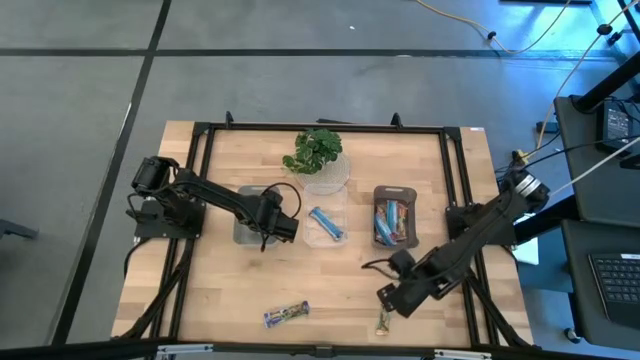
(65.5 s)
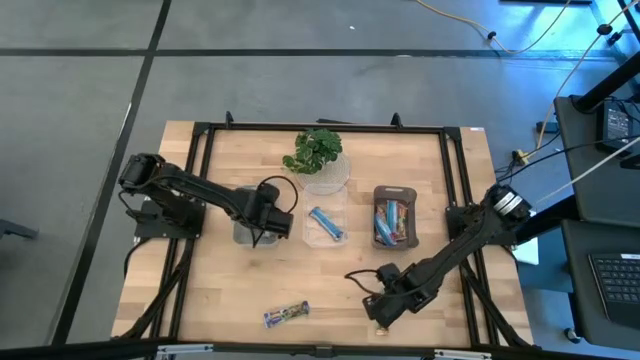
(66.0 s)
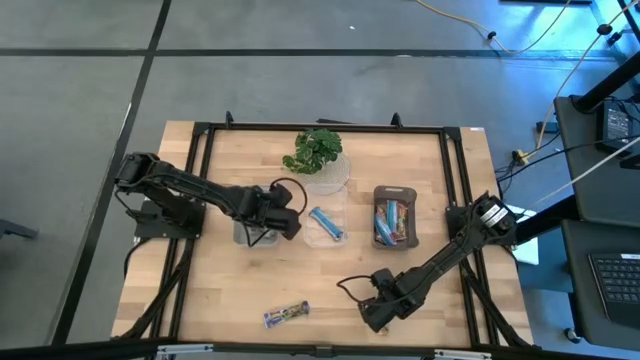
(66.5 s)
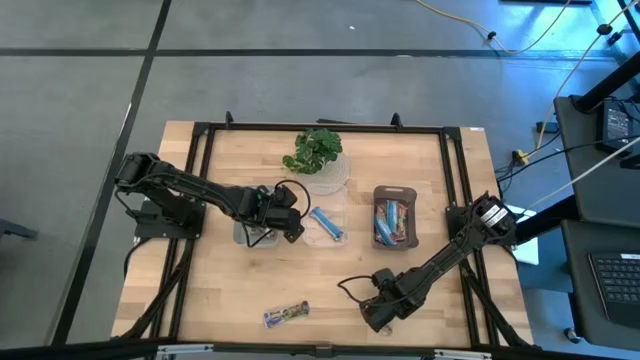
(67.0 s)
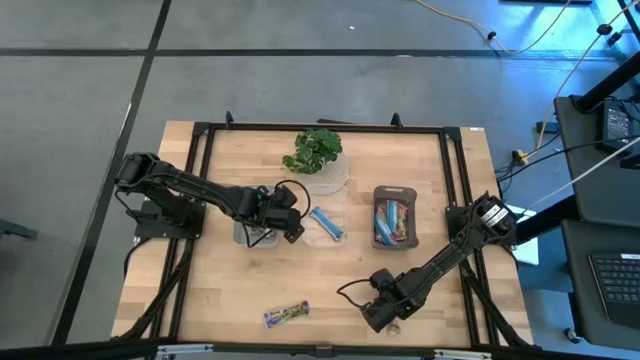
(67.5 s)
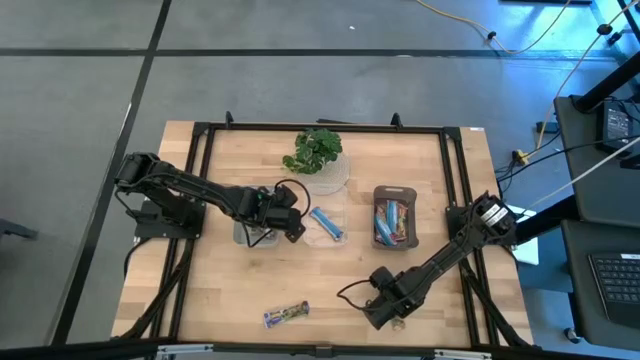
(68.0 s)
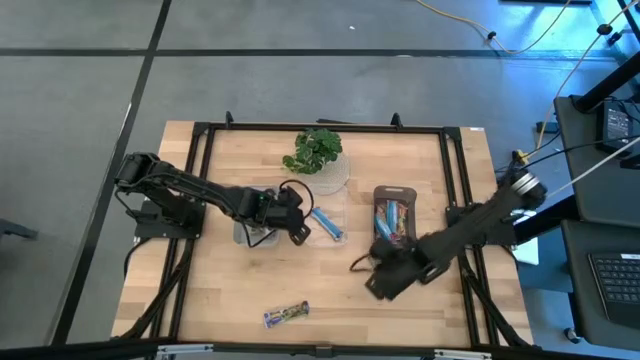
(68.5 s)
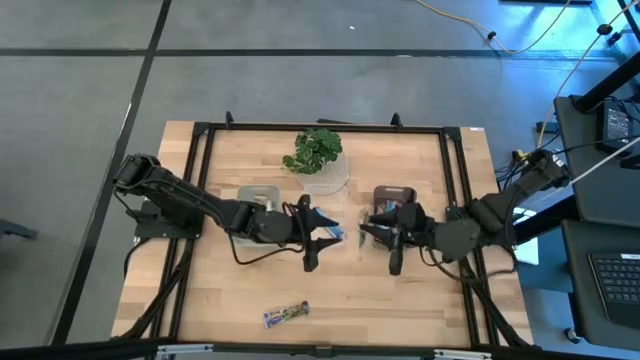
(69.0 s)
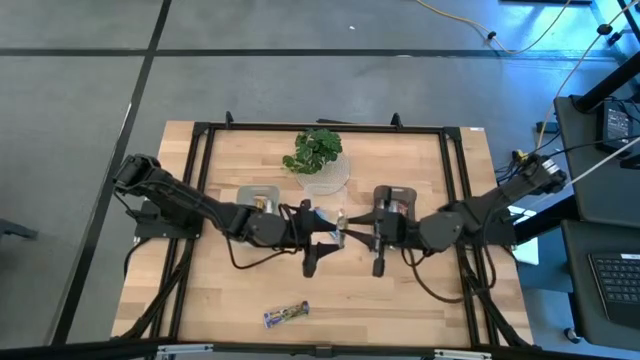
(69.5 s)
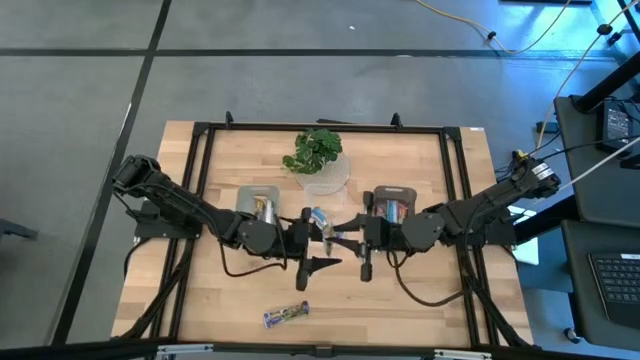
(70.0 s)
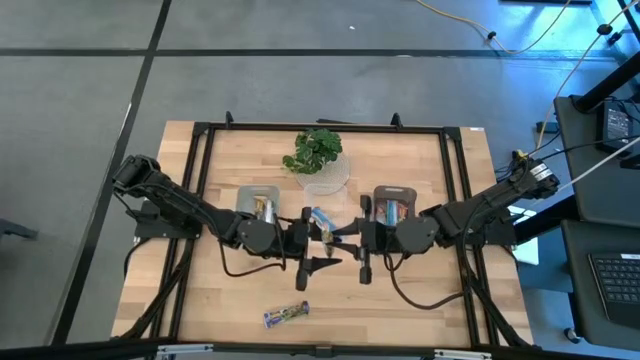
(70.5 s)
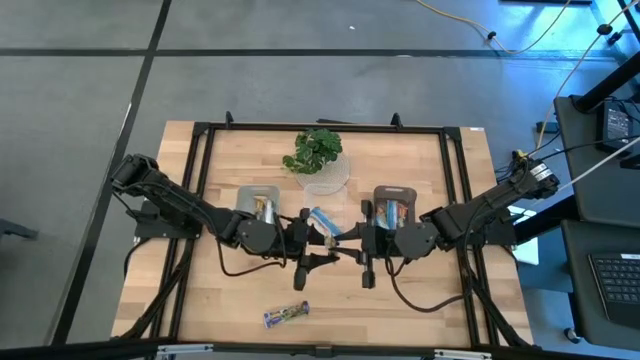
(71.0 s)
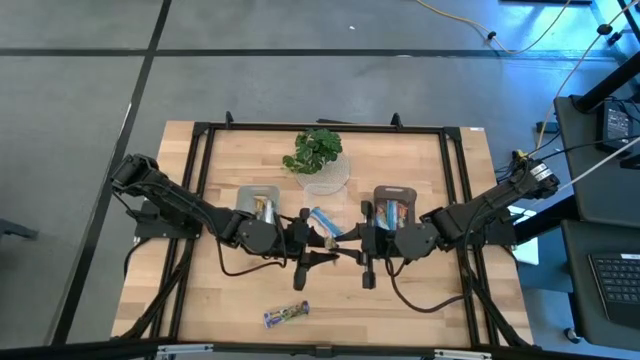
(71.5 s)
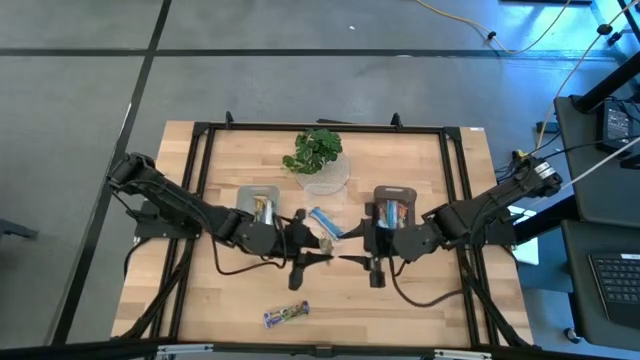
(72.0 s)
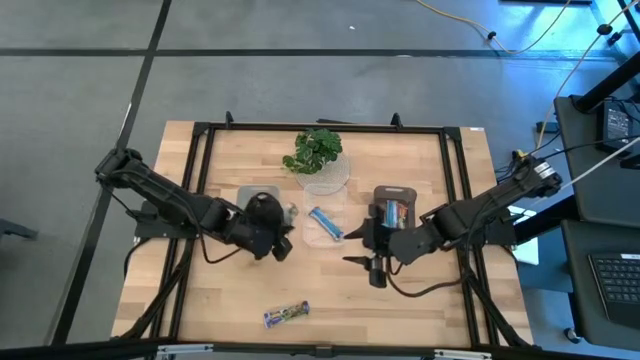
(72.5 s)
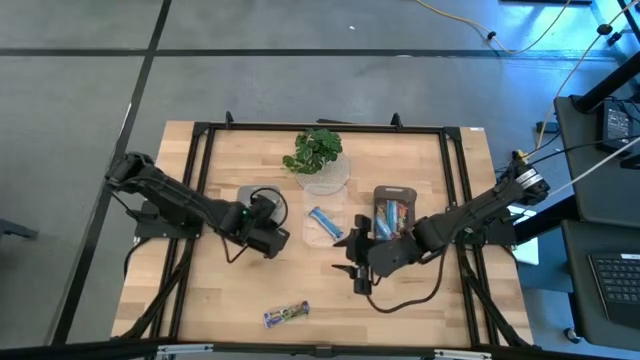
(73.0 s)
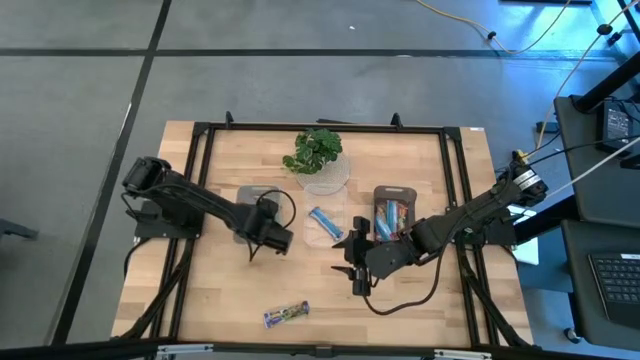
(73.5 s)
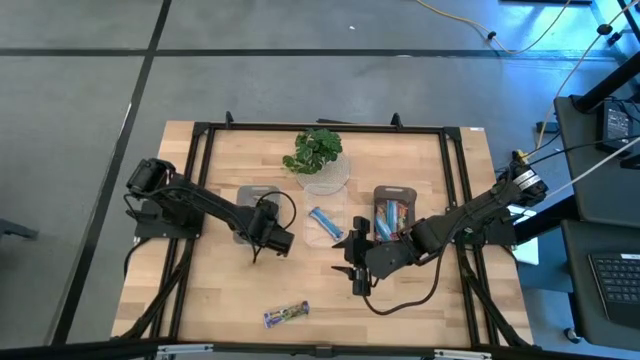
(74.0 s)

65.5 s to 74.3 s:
Task: Pick and place Granola Bars by type
Put the yellow granola bar into the gray bin

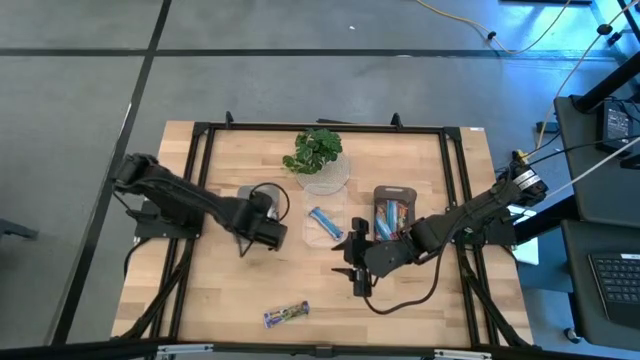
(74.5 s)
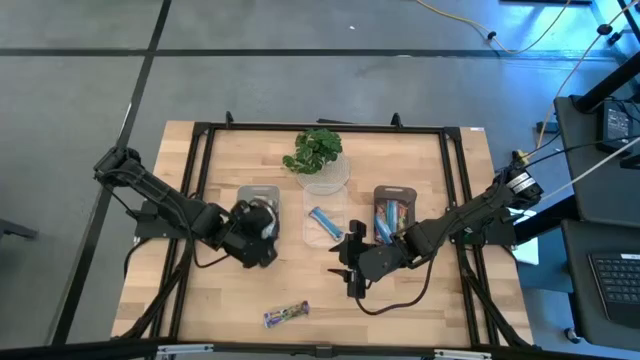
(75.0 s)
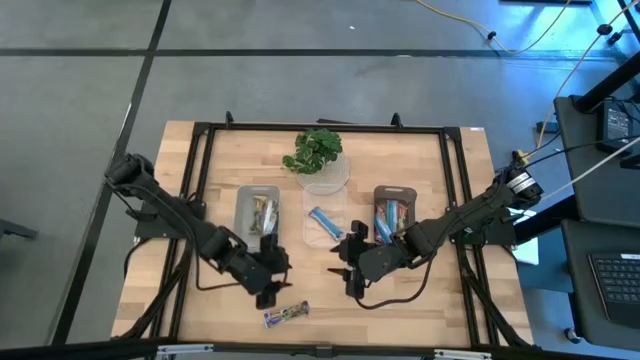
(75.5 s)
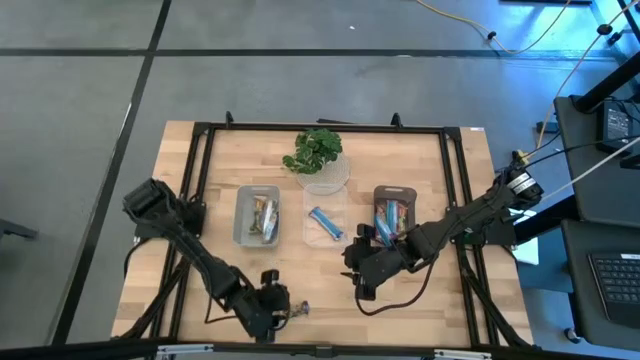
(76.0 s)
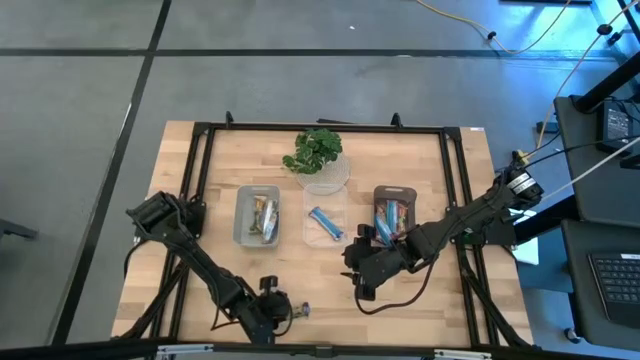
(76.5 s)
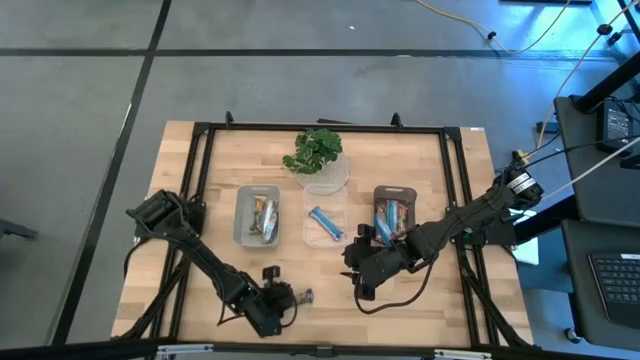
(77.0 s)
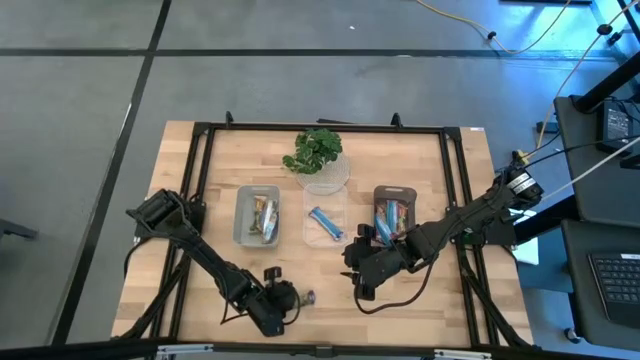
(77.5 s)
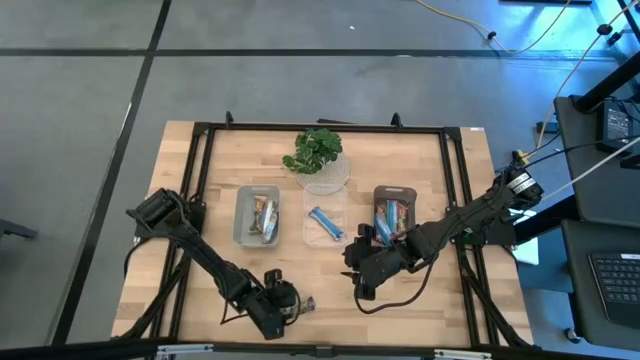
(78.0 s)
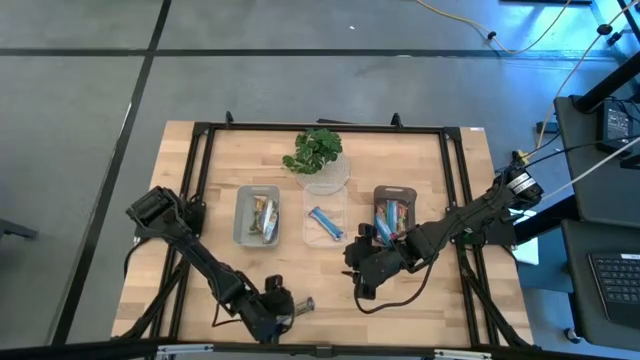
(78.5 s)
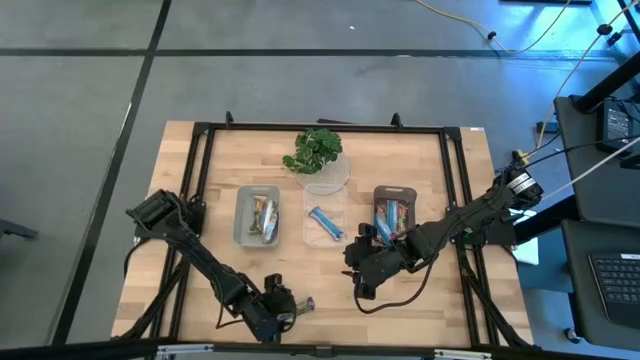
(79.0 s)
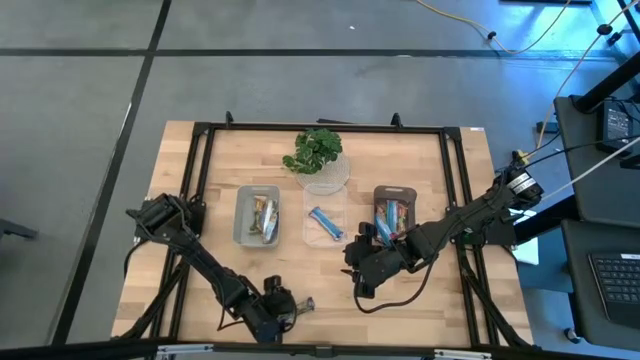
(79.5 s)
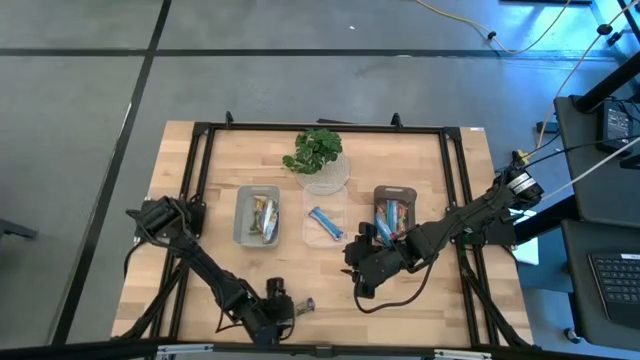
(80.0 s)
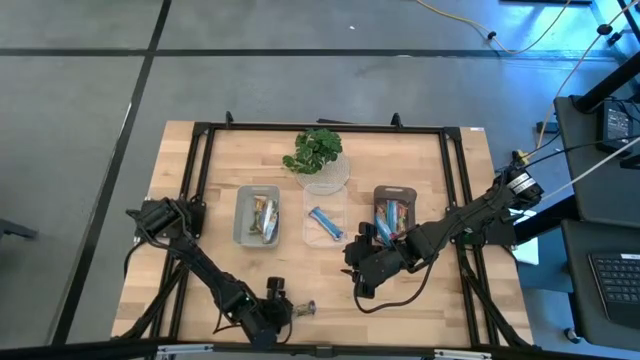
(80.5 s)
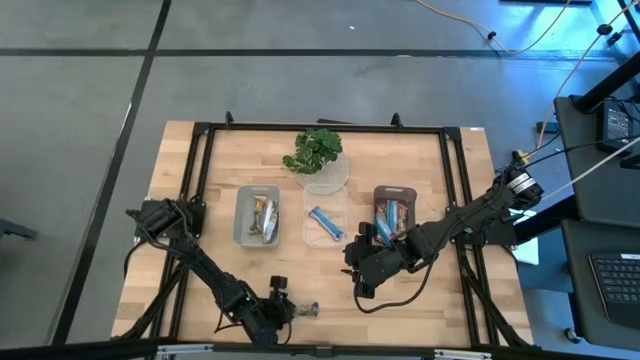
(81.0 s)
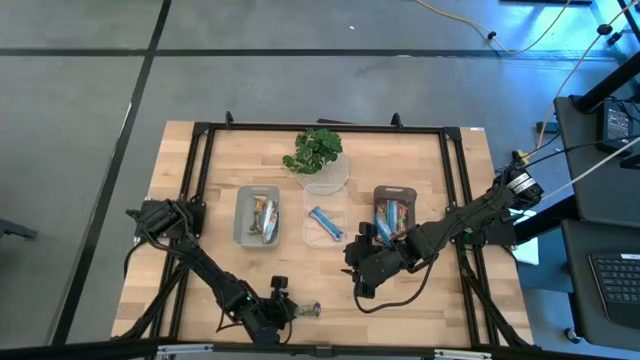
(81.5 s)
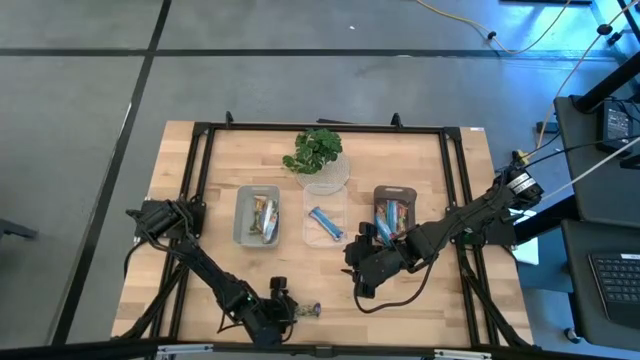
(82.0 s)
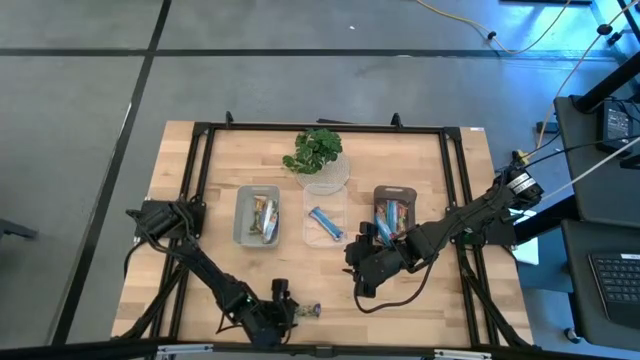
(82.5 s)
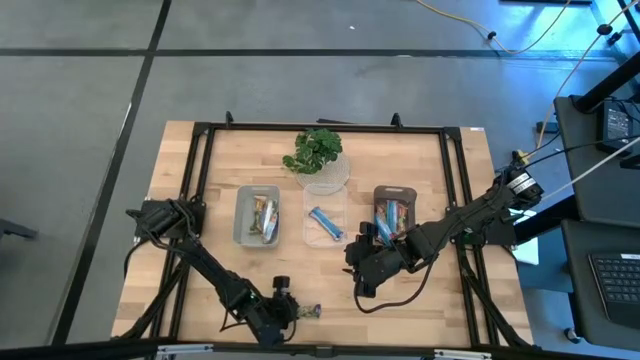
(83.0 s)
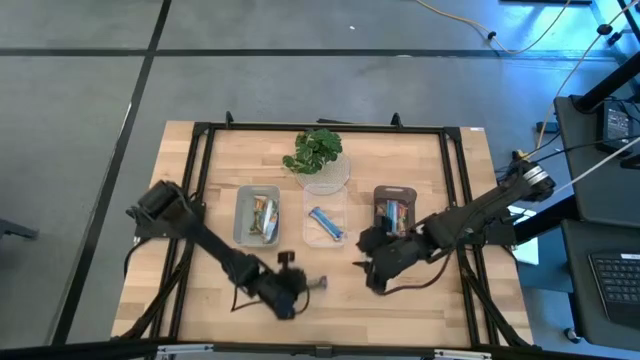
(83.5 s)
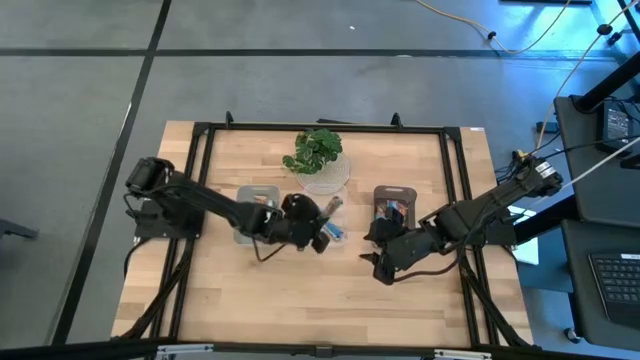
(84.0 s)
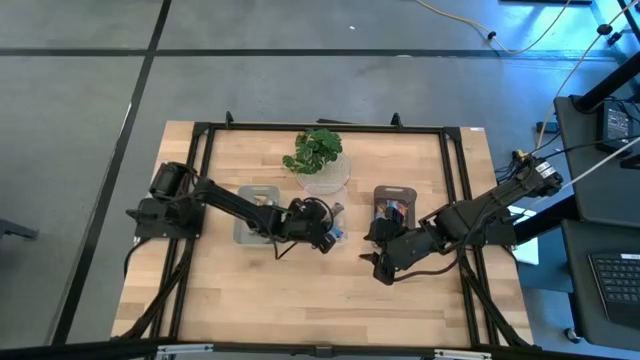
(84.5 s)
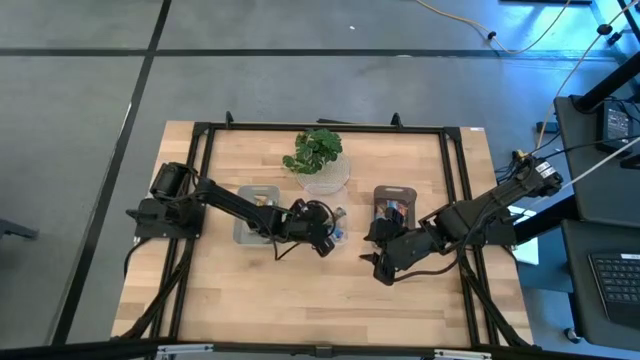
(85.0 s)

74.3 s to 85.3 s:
Put the blue granola bar into the transparent bin

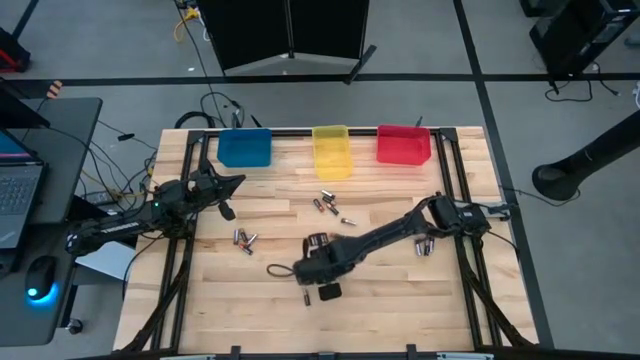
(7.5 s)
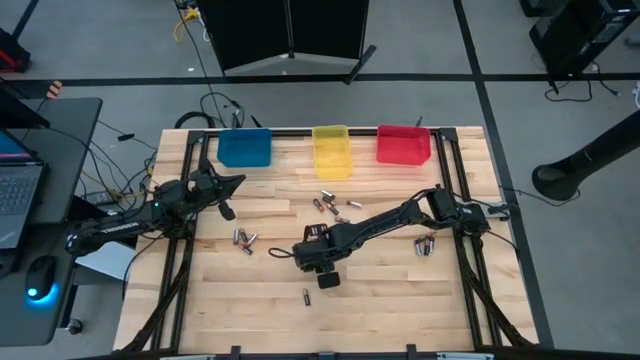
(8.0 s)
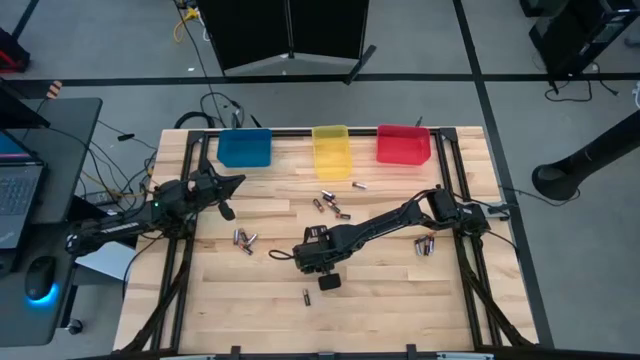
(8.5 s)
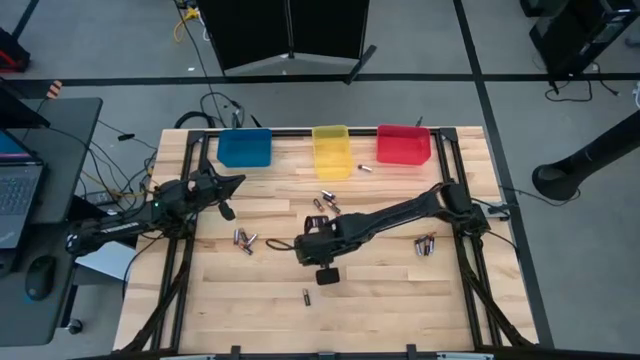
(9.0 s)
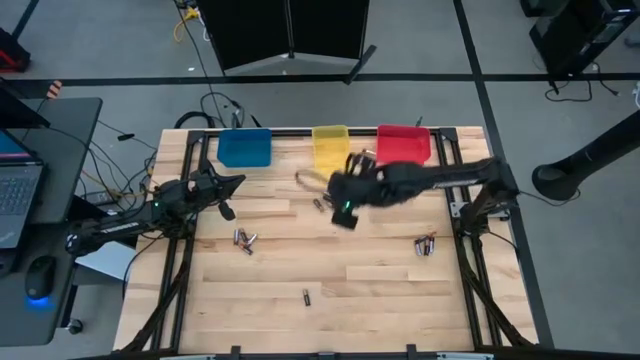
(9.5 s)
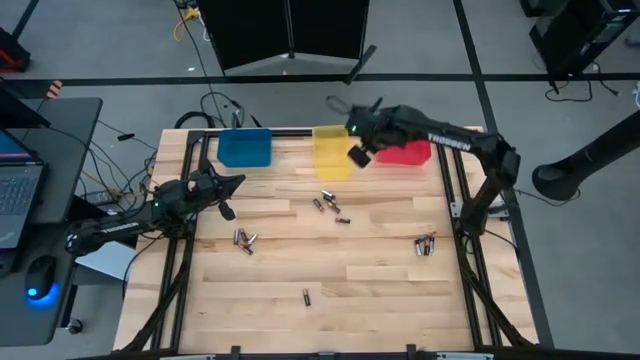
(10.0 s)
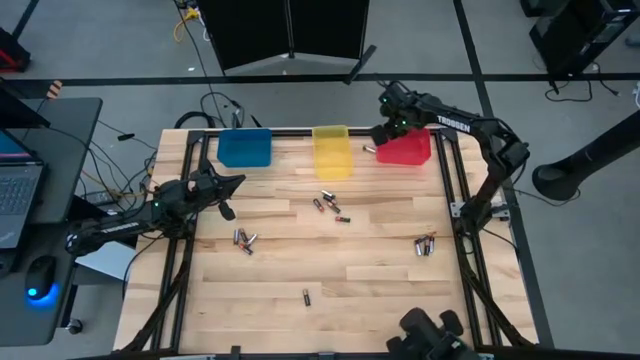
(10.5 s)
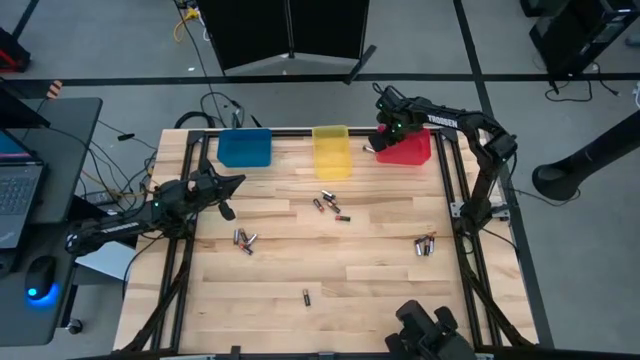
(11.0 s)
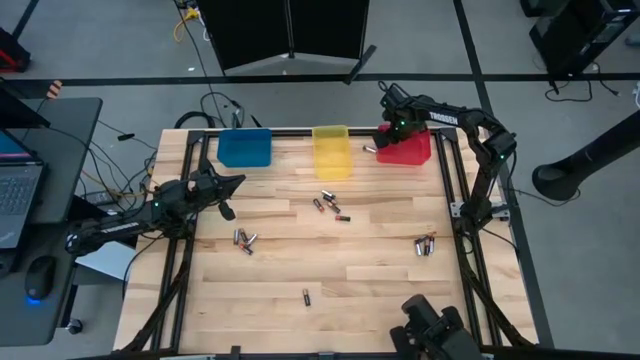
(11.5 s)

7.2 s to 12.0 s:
Task: Sort batteries
Put the black brown battery into the red bin
